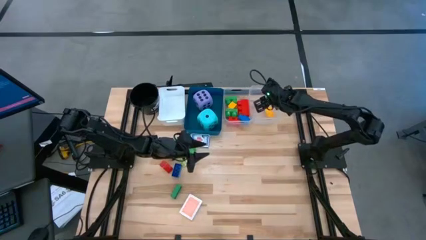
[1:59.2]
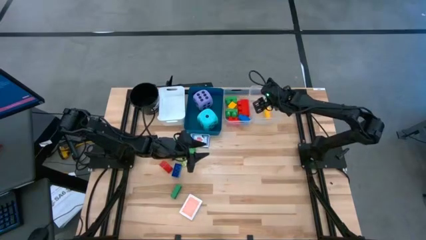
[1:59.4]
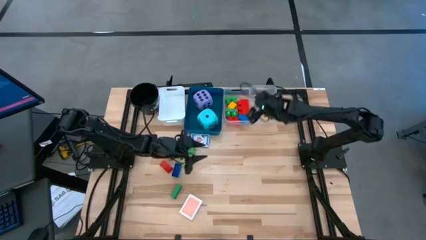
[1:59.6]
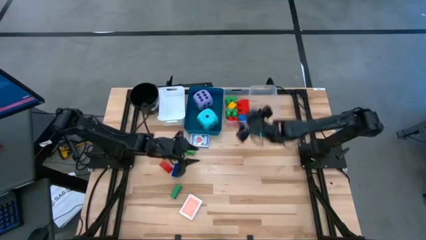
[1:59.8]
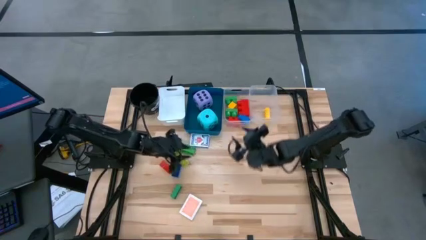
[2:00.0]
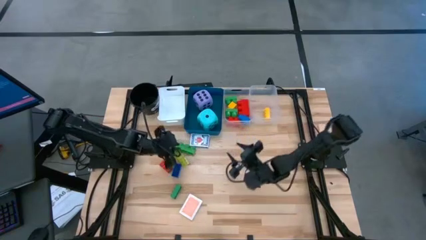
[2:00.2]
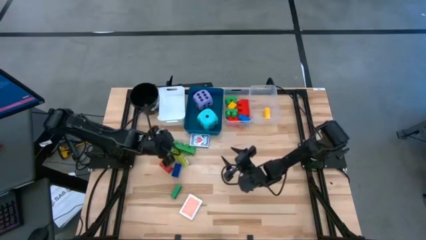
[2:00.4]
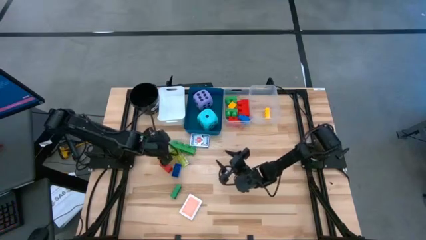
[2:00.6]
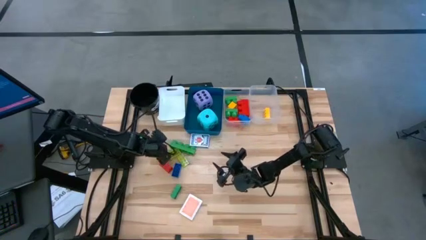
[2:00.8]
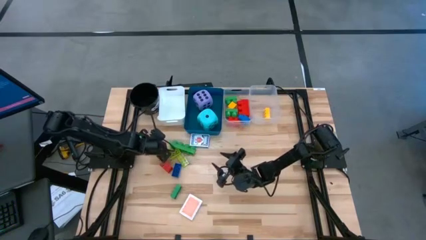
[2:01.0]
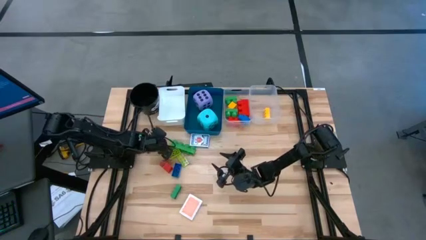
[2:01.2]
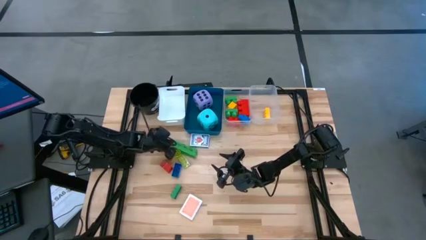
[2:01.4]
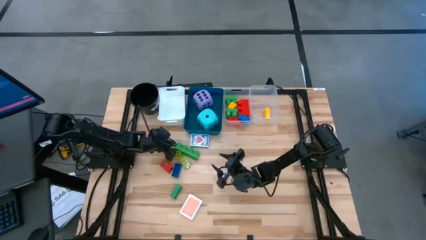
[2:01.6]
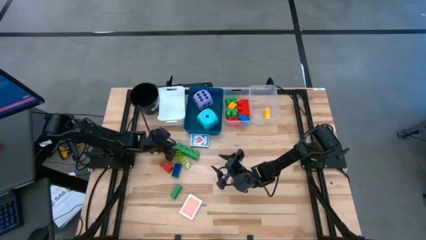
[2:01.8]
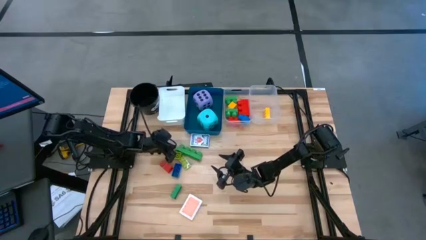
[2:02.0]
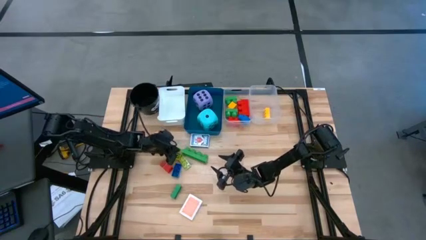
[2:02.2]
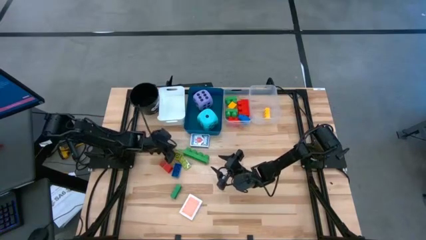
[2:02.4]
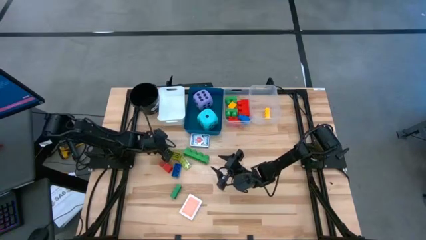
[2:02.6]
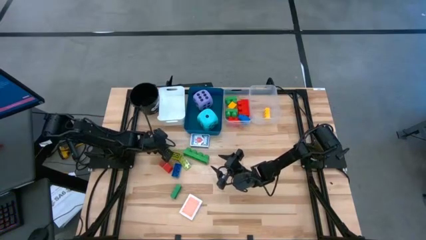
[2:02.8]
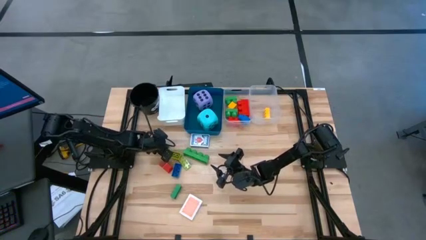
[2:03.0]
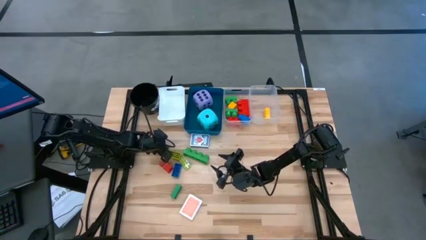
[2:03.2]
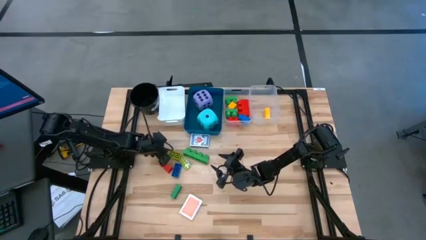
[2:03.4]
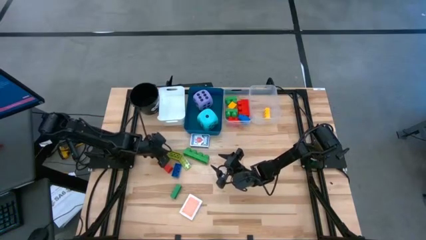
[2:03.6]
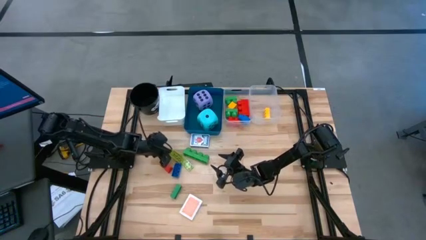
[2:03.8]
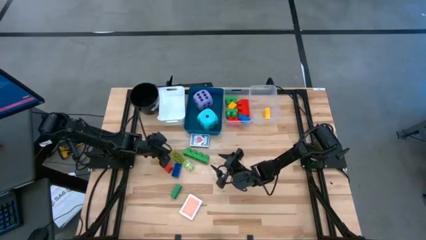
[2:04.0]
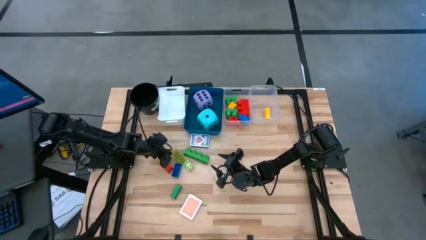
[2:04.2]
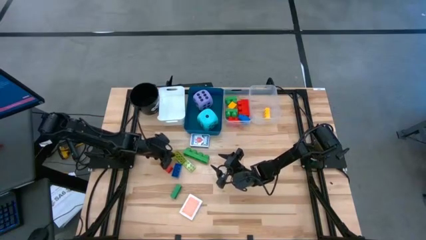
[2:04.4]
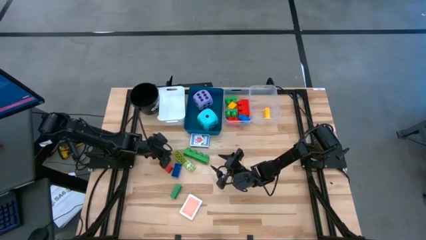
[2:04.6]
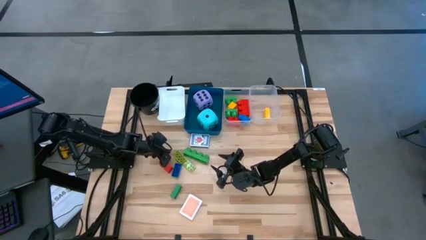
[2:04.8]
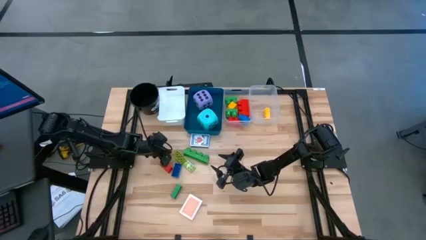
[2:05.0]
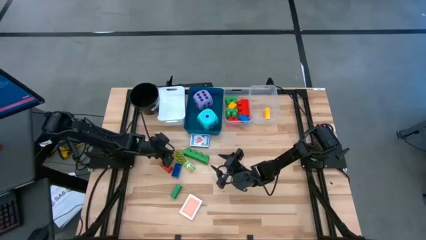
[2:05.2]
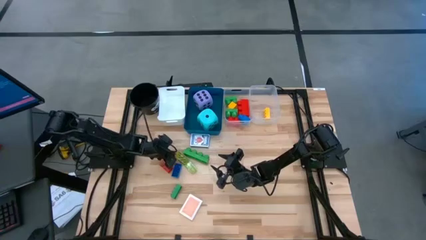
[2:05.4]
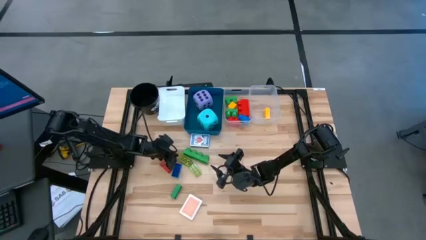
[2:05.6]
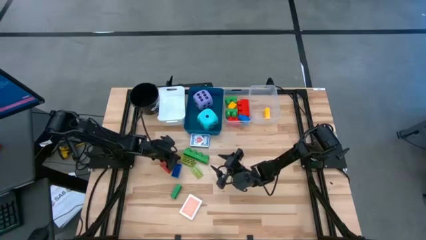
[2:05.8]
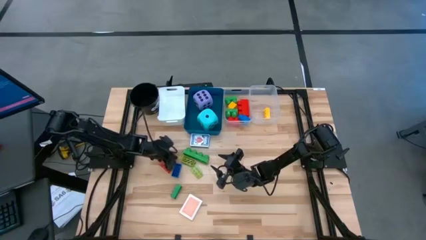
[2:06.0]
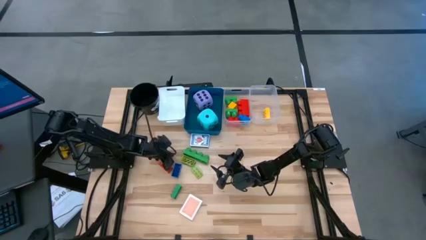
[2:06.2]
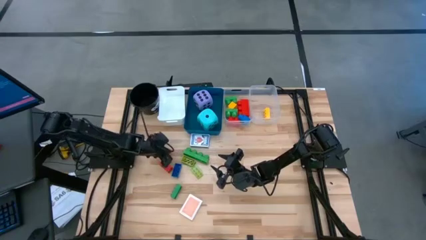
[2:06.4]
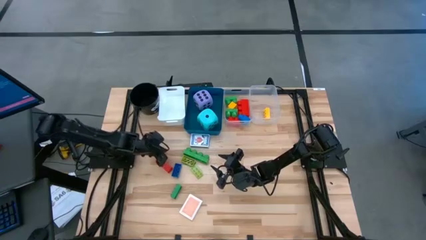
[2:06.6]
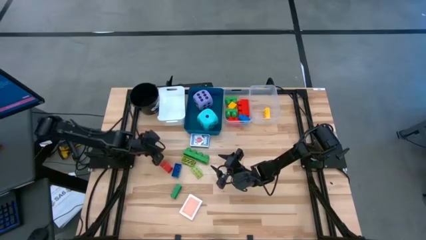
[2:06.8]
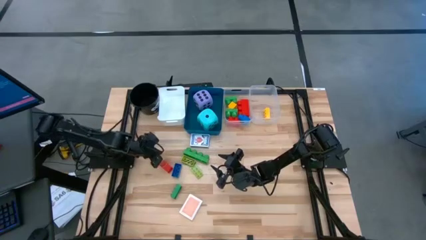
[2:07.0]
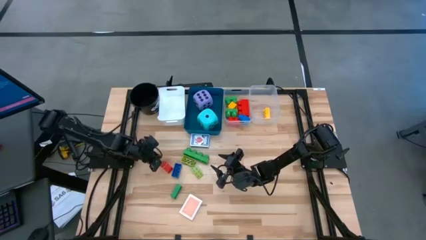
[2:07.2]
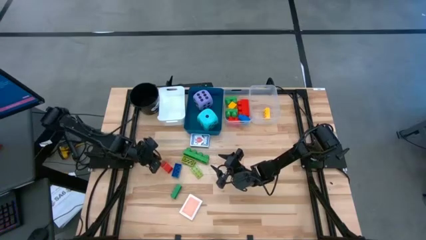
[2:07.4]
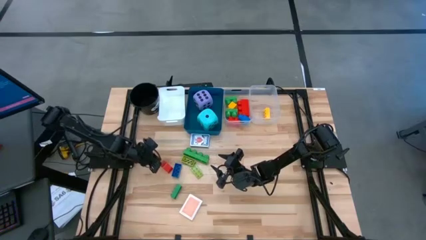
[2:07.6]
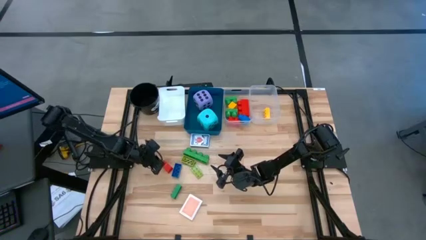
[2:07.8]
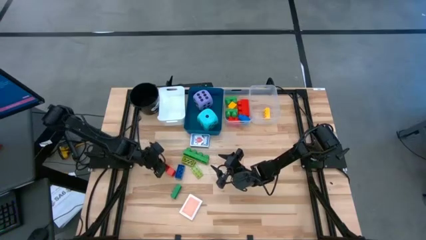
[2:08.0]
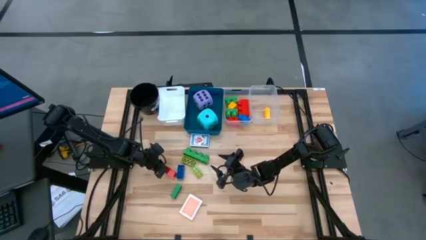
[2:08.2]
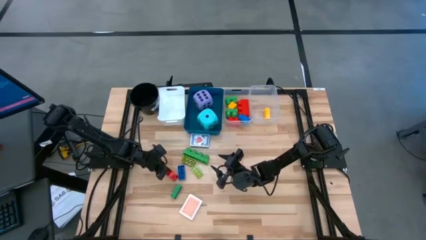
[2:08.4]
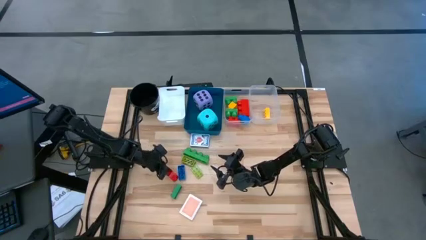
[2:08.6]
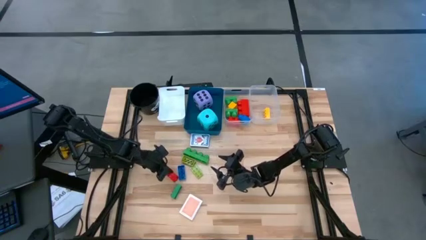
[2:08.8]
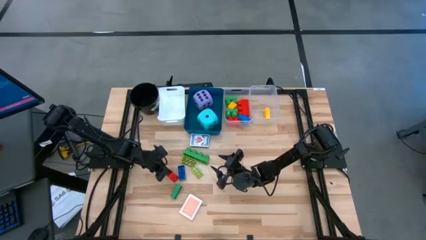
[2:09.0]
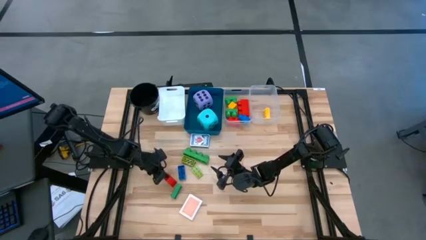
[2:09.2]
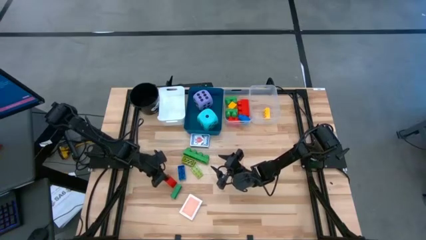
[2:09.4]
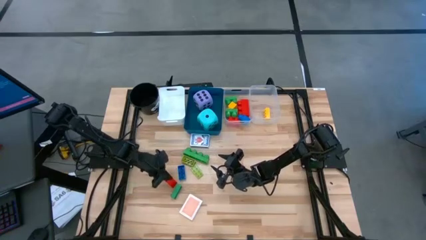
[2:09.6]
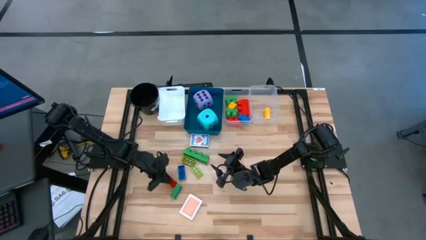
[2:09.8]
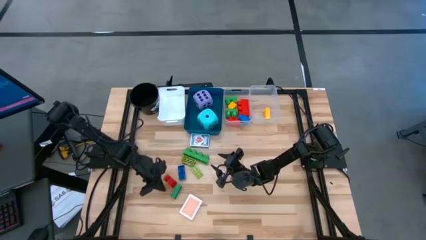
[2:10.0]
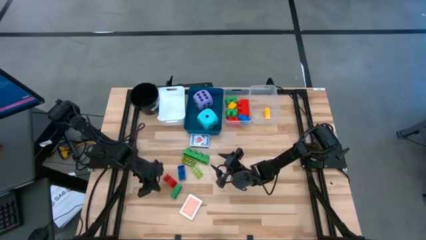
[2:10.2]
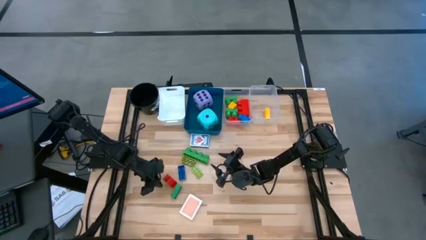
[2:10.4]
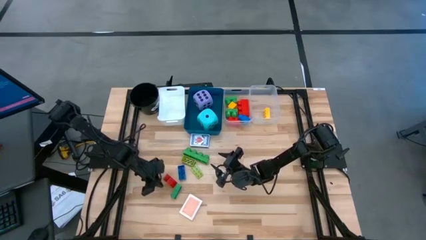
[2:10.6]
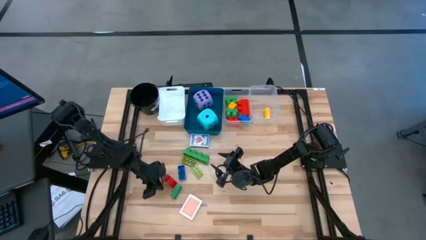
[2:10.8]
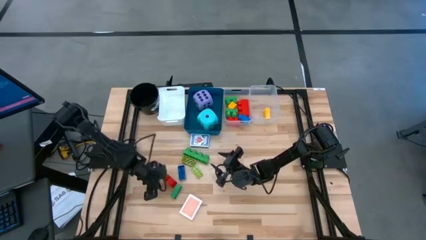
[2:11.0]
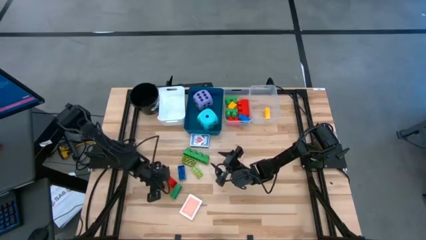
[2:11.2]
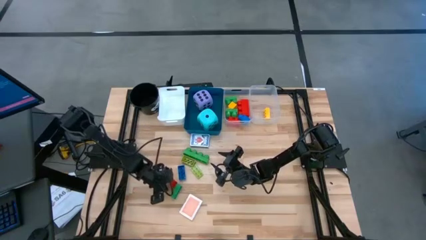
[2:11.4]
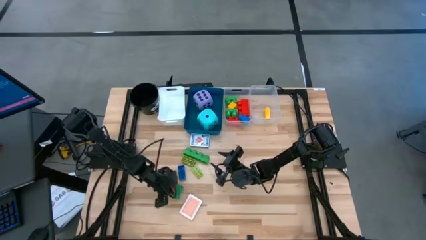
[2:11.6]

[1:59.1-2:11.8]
Task: Pick & Place Toys
Adjust the game pieces on the table

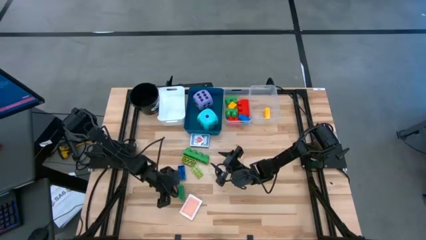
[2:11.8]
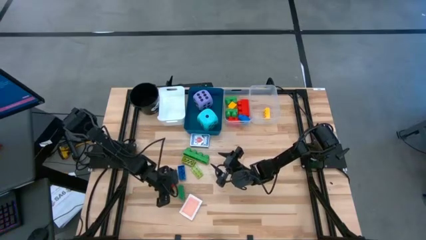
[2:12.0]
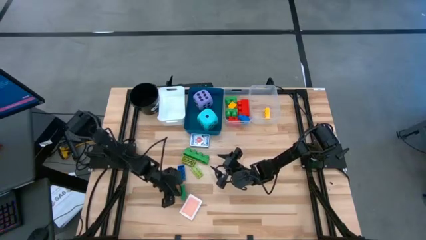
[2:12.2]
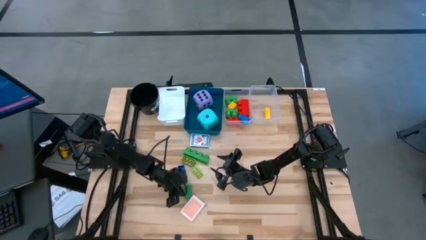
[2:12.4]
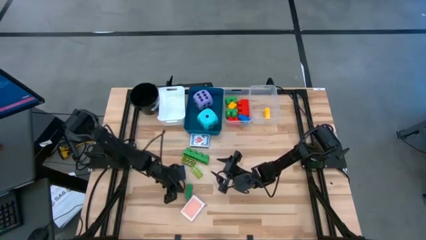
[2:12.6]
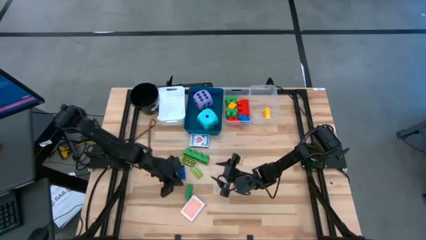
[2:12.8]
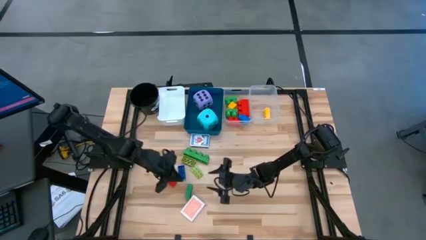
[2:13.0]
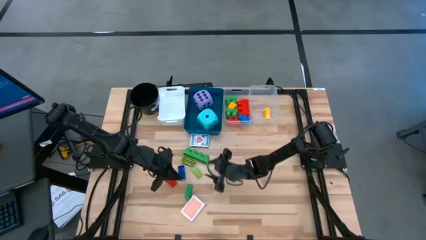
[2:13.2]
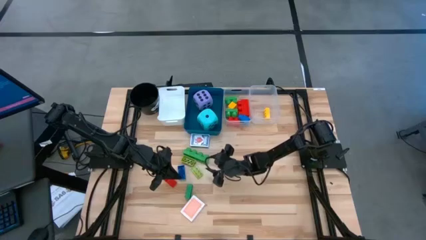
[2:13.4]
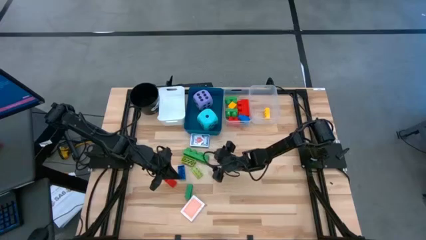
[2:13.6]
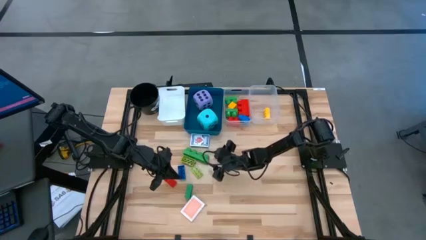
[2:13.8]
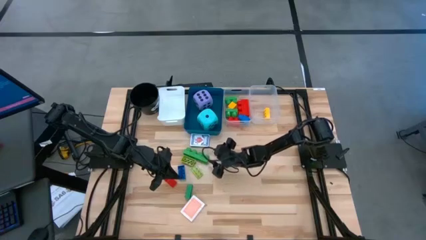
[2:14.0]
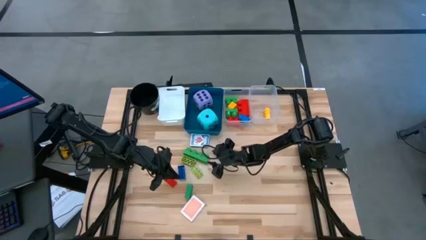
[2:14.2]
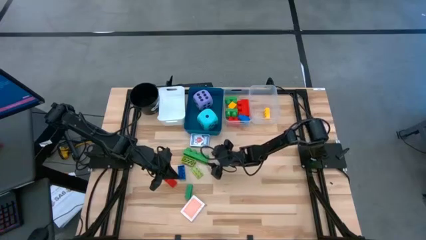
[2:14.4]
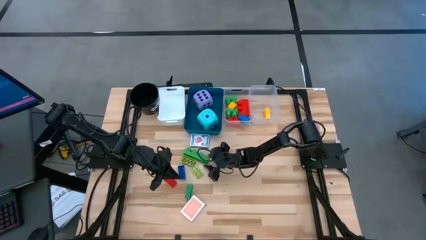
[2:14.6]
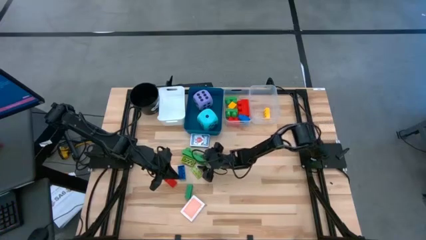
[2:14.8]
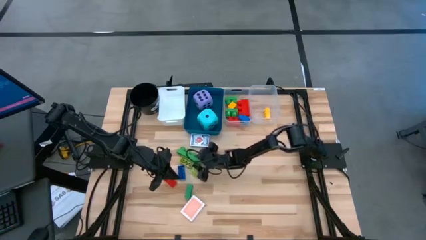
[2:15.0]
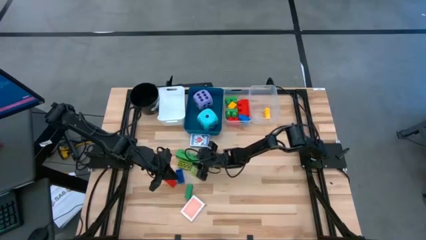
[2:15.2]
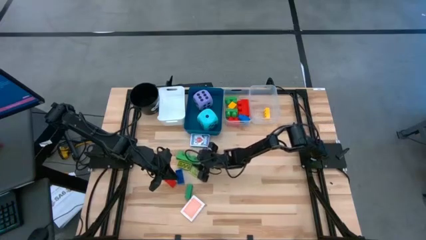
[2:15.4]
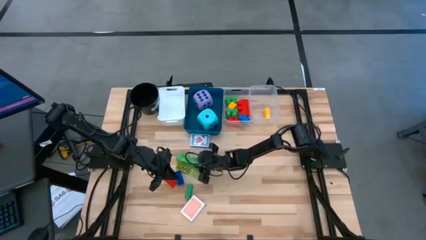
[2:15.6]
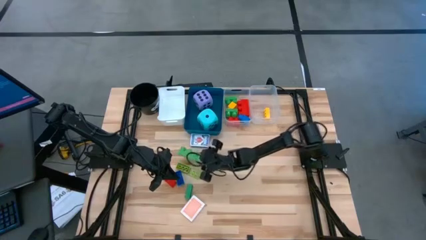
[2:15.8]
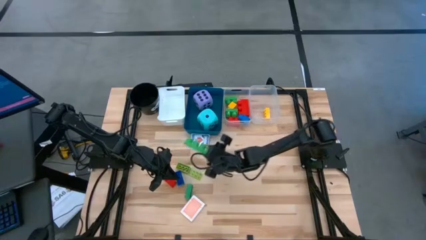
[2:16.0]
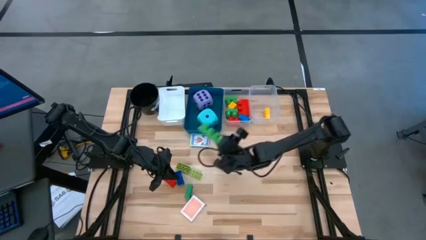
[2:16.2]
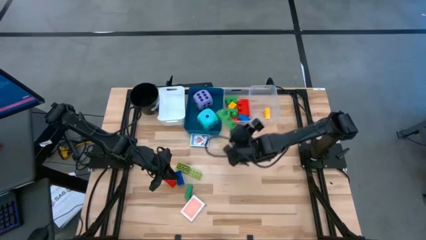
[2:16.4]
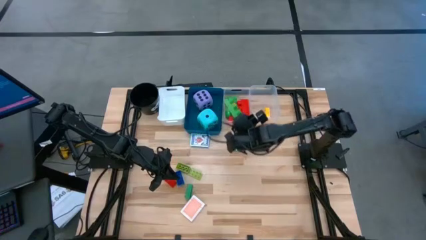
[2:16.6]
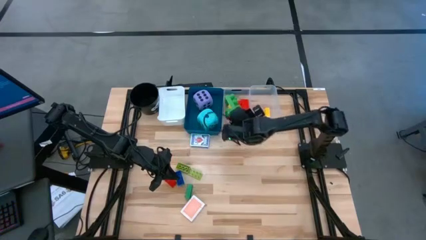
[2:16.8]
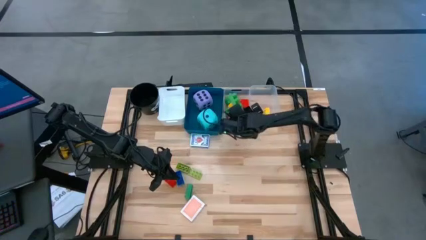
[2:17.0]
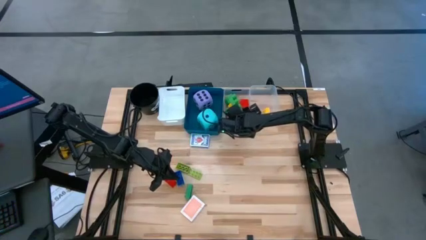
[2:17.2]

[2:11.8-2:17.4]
Put the green 4 stud game piece into the left transparent bin
